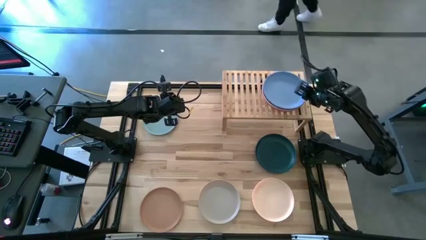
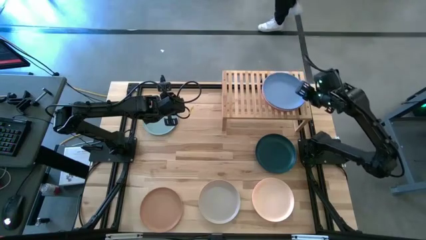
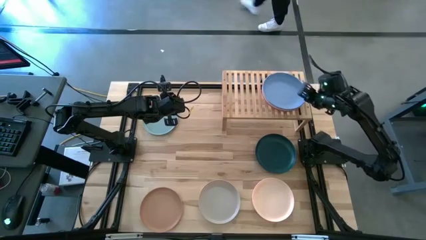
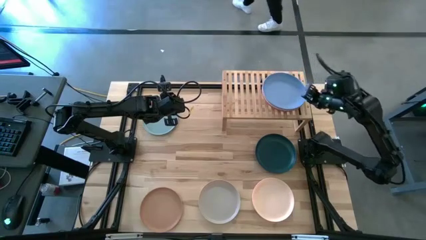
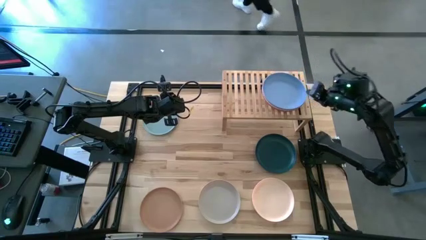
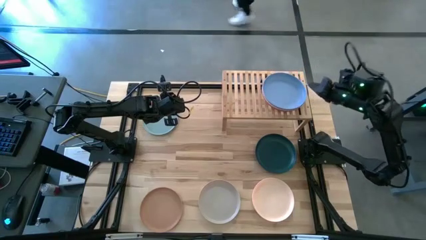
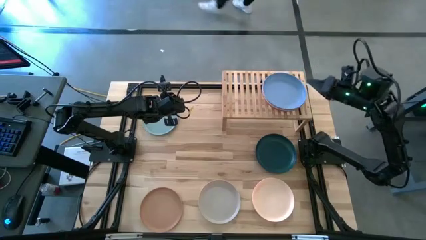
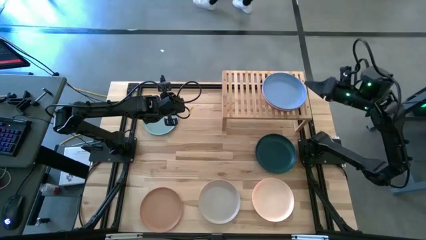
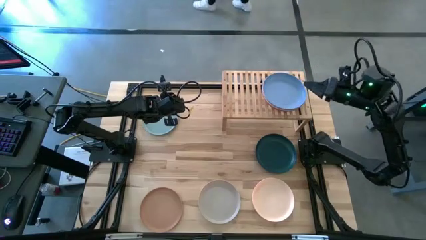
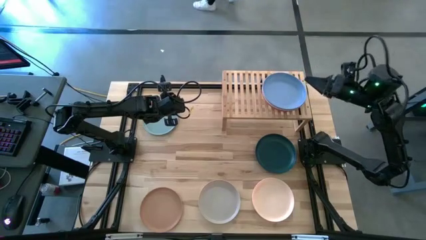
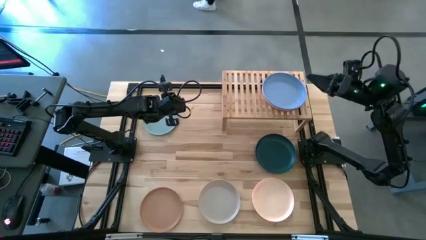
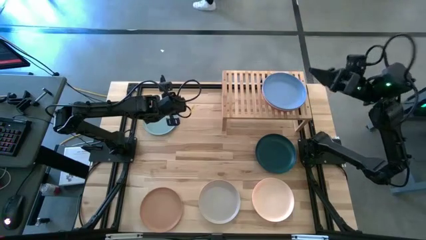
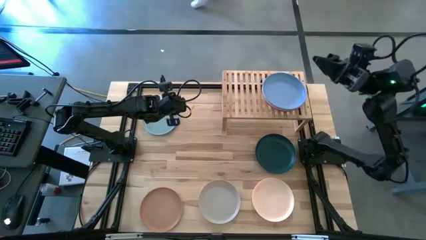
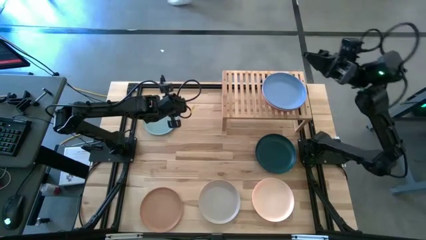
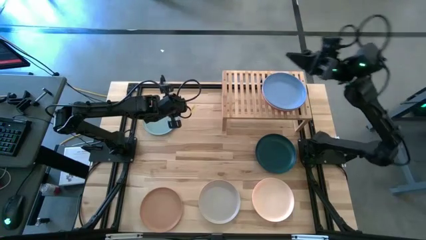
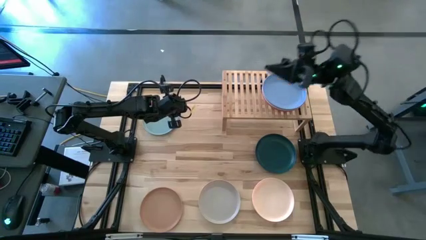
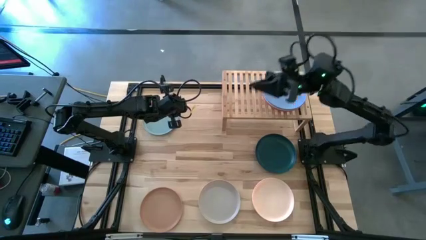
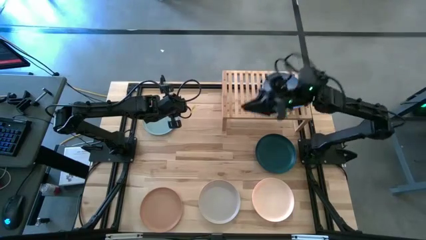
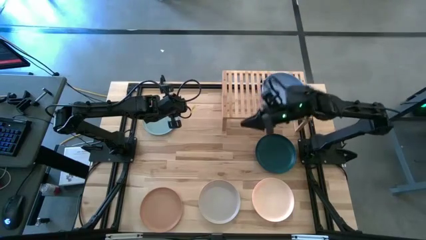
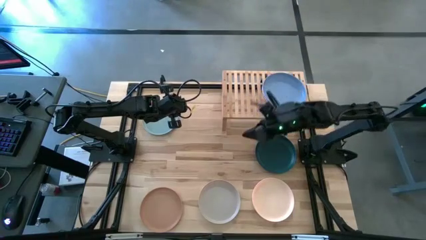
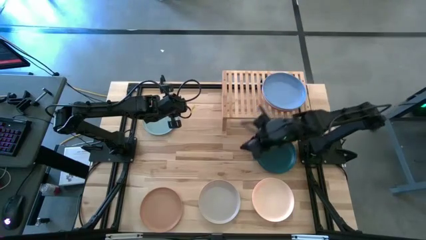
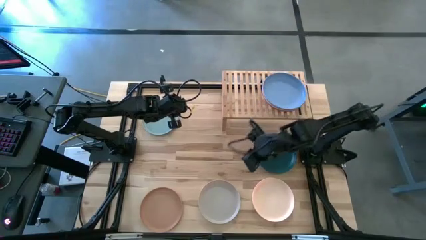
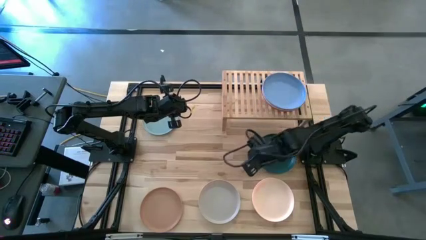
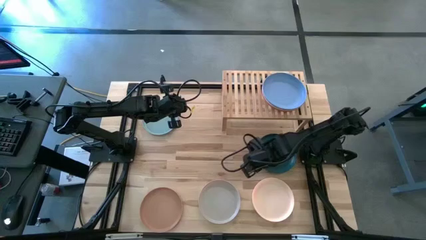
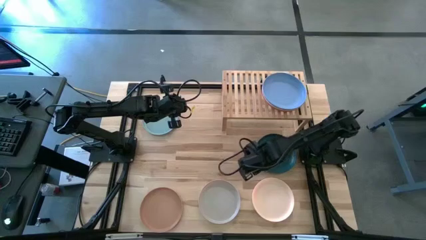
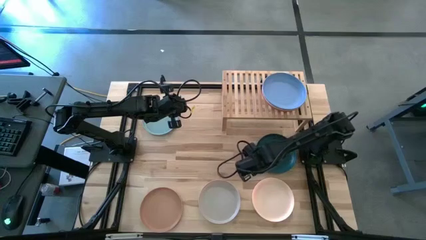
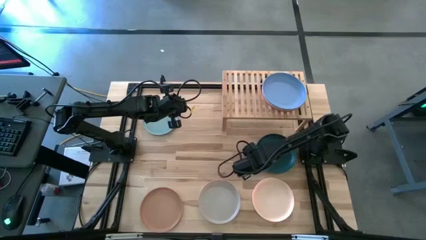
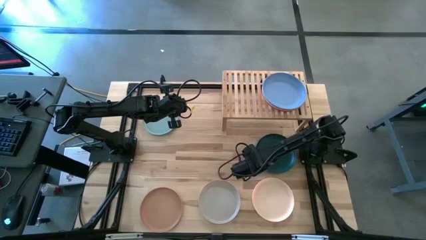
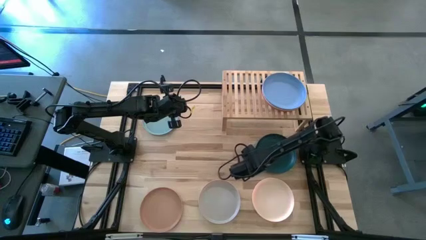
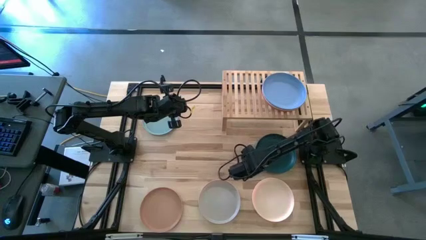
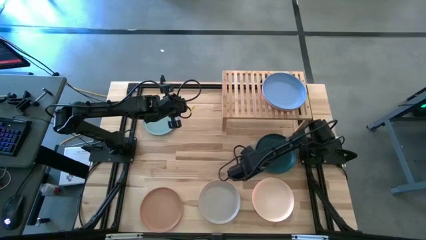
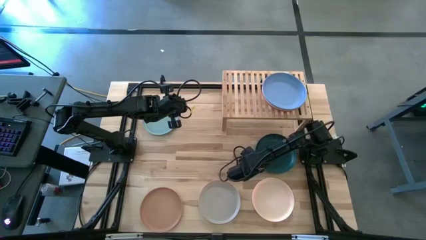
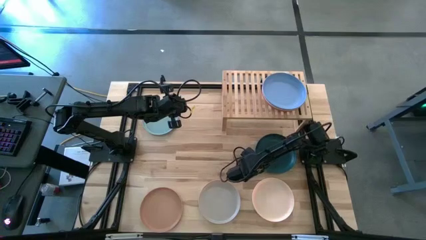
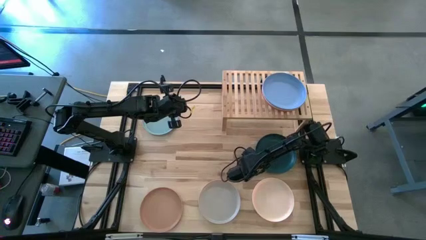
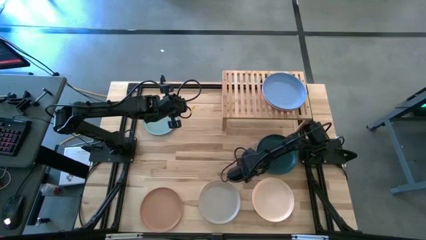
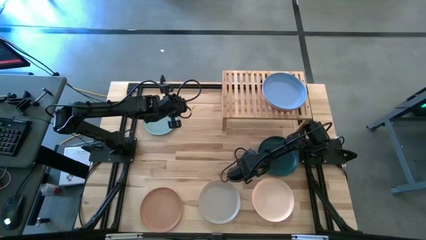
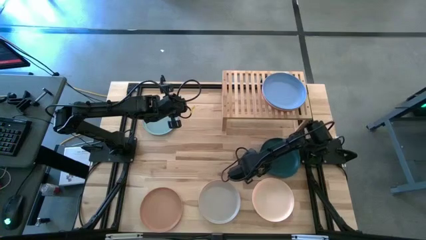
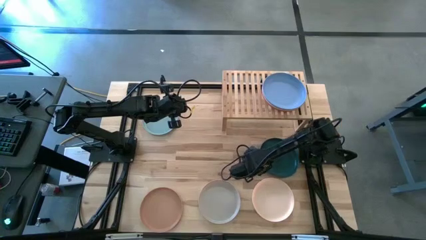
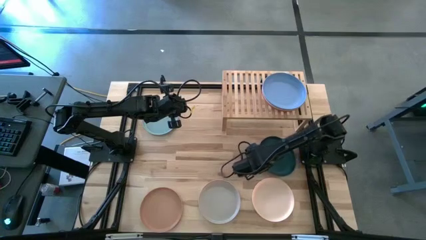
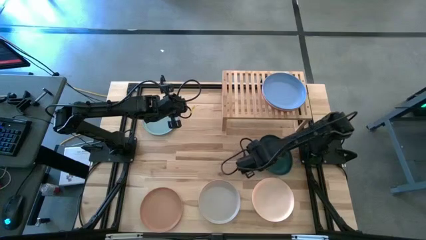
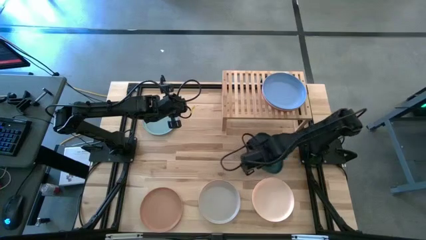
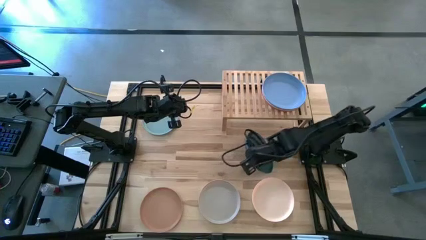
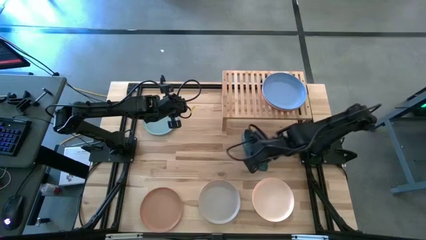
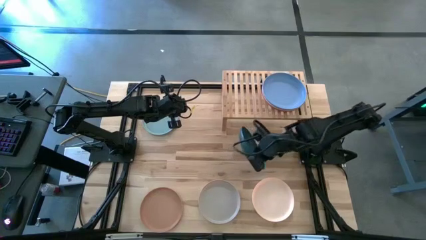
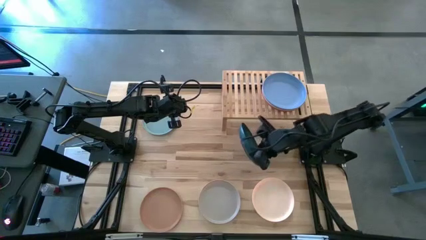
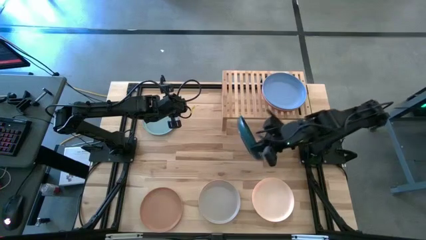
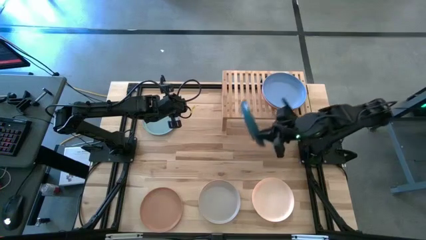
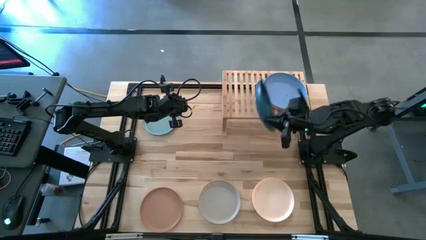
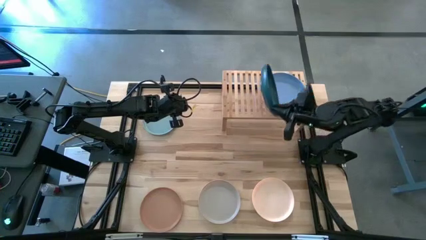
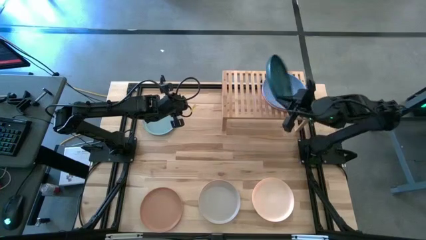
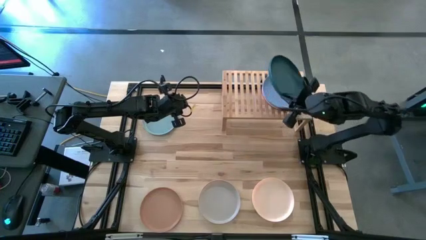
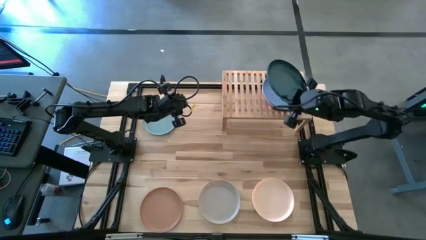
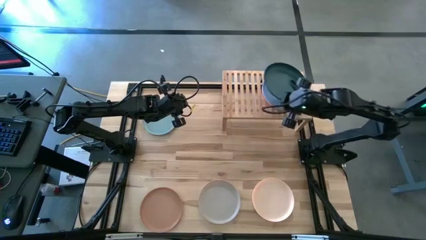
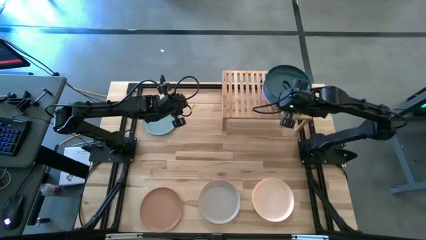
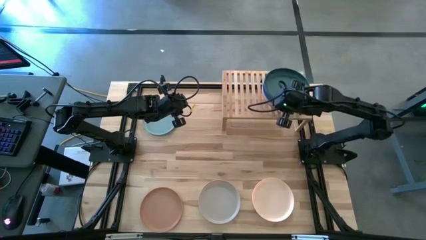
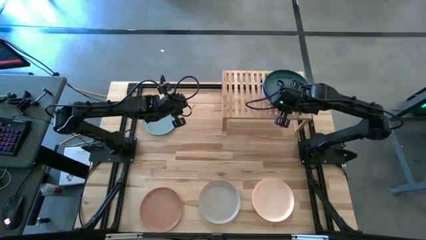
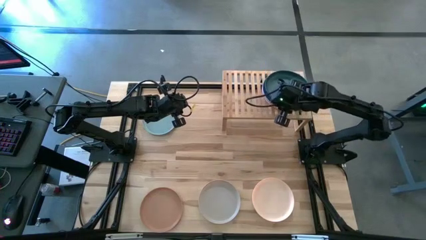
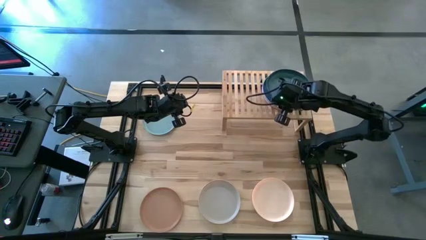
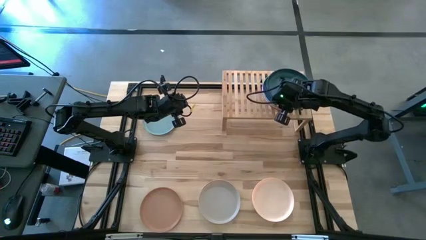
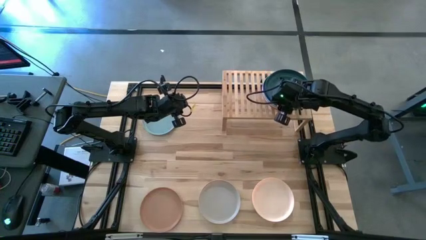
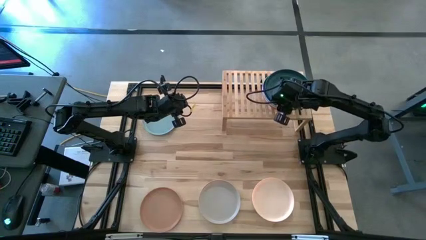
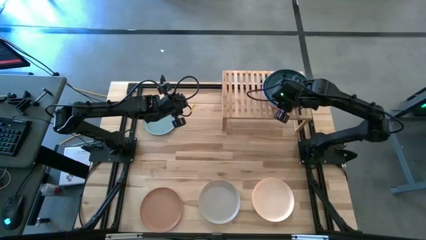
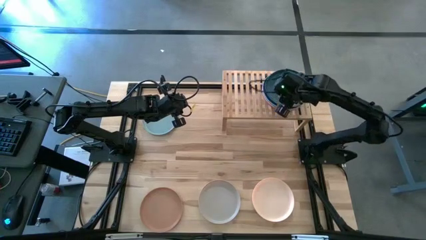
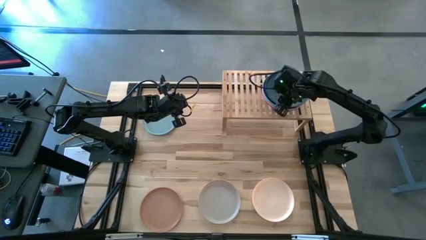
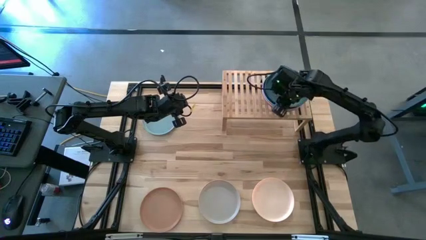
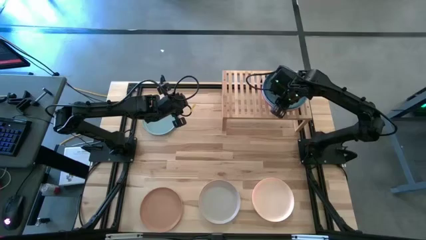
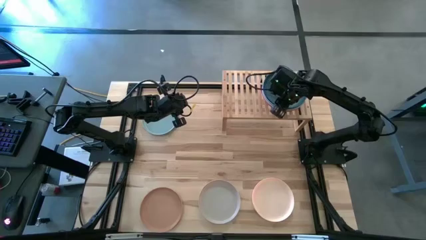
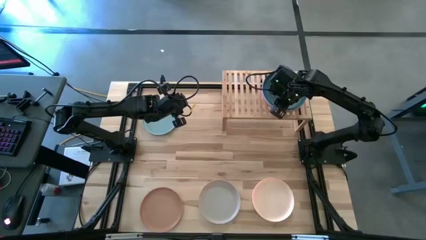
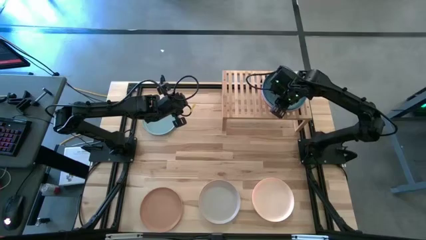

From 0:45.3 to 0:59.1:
Task: Place and stack plates onto a shelf
Stack the green plate on top of the blue plate onto the shelf
